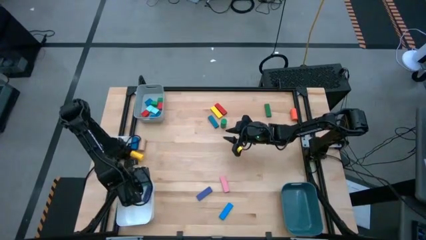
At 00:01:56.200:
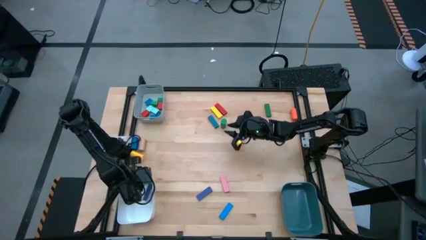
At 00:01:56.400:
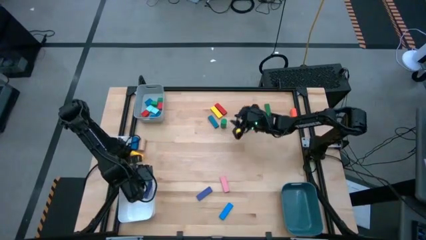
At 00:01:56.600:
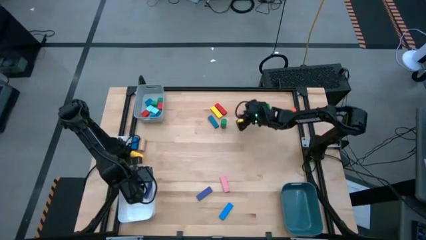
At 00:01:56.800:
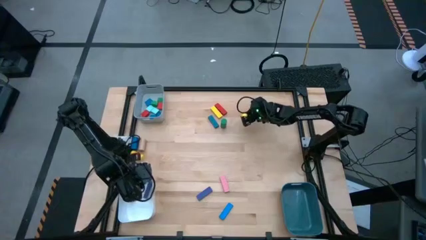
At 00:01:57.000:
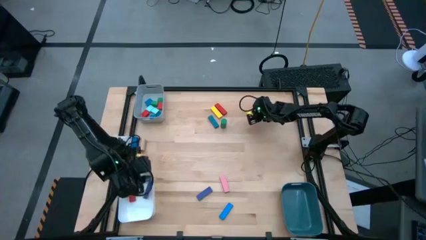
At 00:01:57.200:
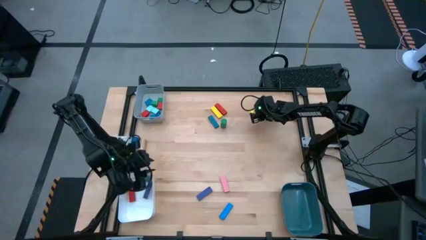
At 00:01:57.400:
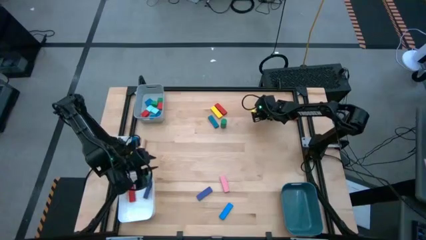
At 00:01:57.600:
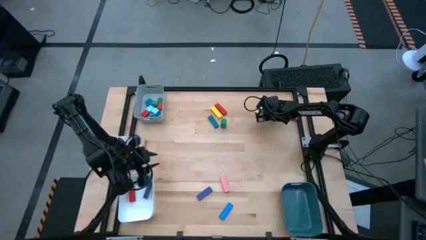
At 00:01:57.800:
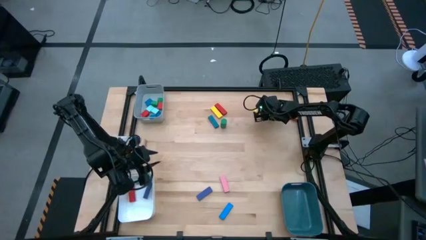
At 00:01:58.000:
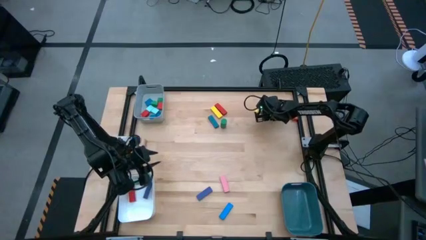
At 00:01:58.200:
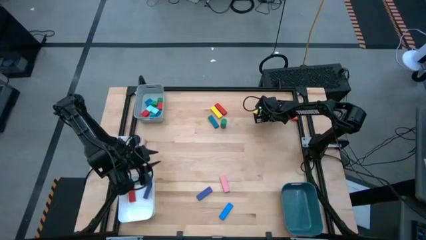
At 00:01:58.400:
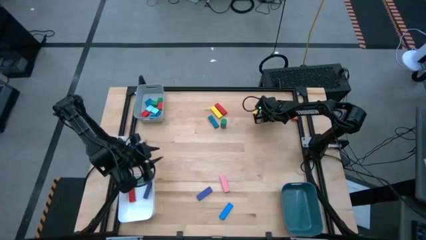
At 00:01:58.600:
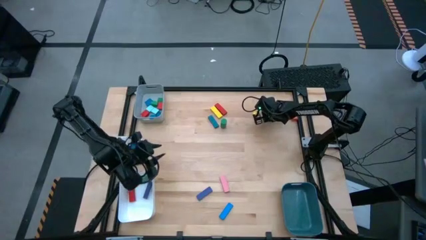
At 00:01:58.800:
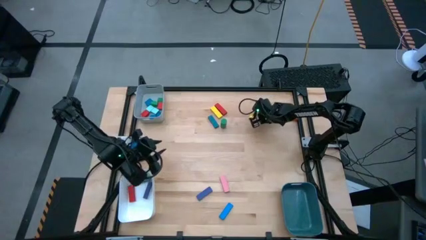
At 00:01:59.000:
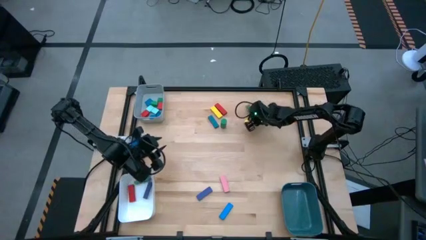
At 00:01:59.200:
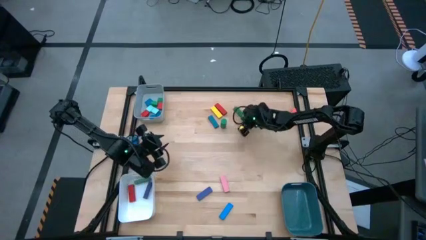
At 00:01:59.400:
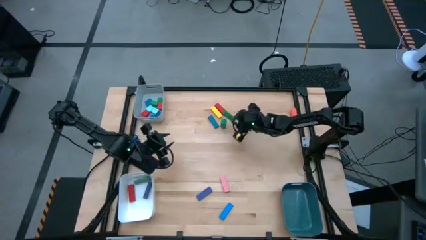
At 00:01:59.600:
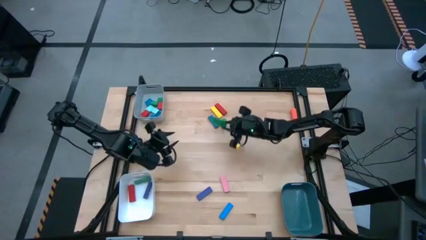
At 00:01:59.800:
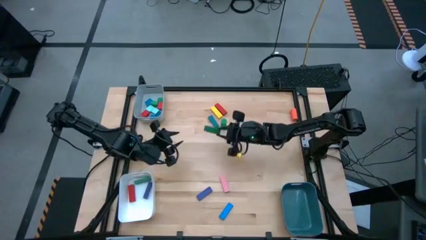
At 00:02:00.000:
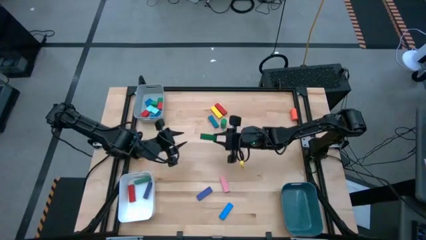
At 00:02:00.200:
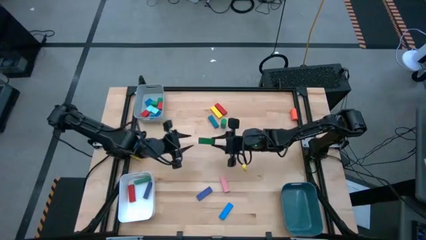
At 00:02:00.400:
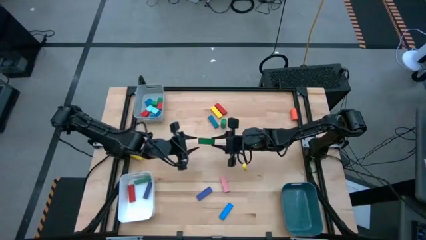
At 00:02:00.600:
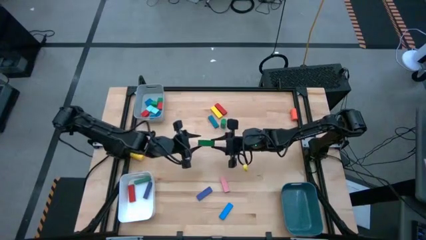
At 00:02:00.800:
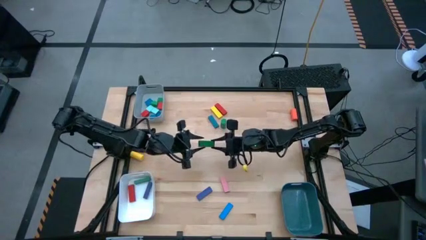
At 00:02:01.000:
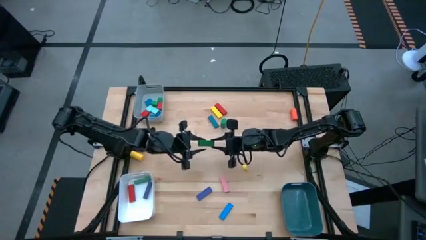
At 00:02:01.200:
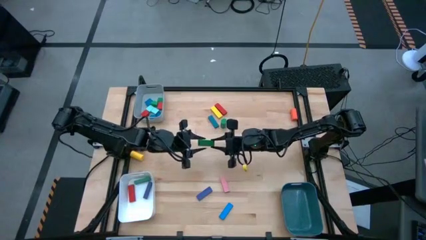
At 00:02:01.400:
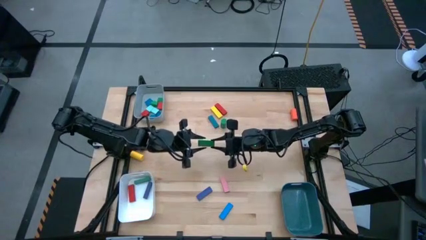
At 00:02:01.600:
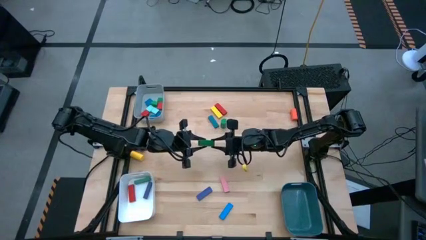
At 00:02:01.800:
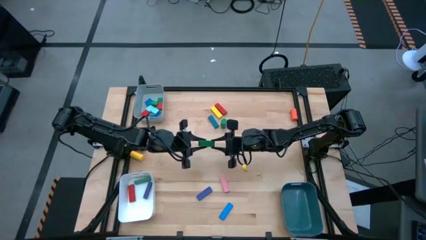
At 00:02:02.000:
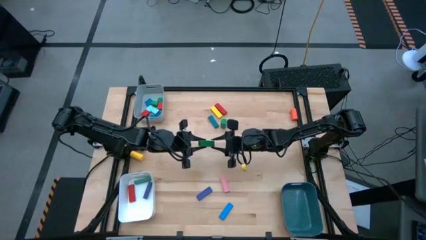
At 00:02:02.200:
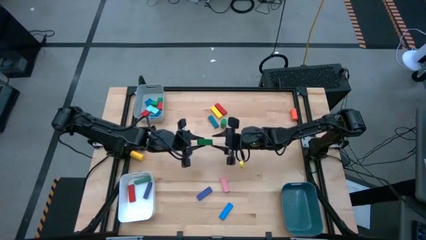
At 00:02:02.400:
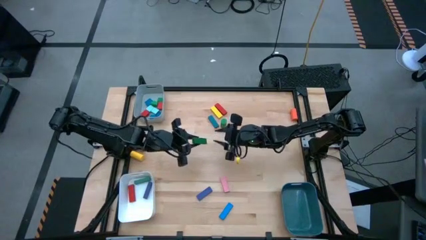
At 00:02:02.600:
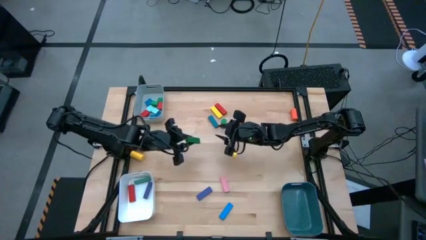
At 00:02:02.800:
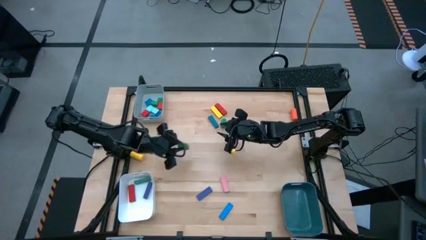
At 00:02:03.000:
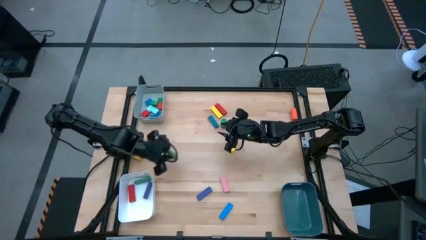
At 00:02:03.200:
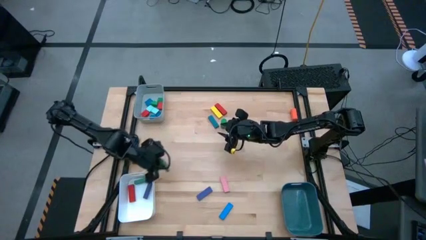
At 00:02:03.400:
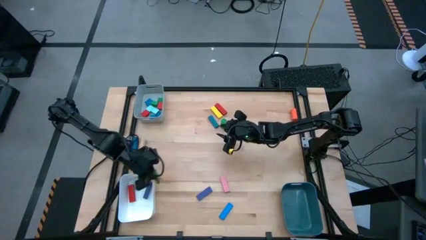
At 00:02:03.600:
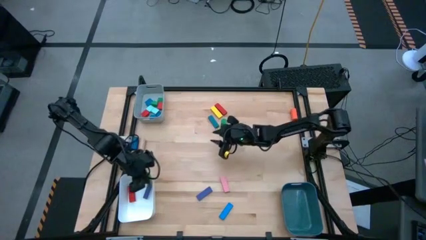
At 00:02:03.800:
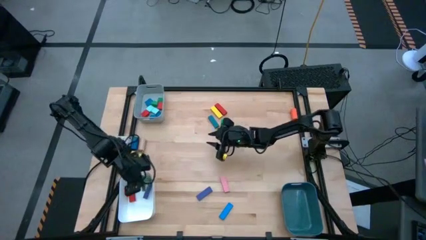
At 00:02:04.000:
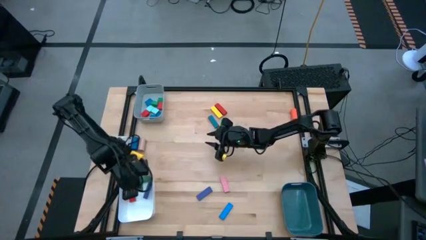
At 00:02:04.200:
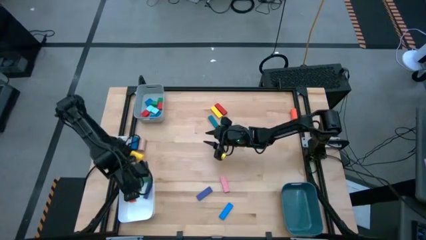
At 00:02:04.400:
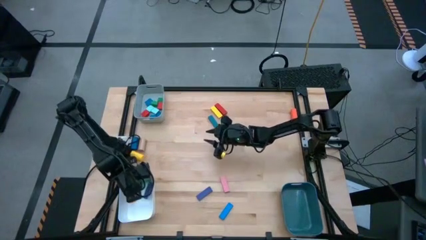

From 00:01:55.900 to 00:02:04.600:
Task: Sort blocks by size
Put the green rectangular block into the white bin

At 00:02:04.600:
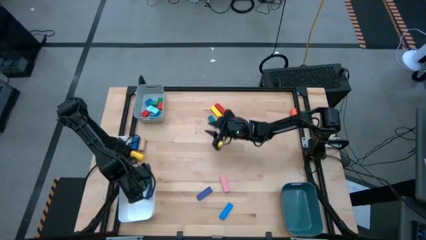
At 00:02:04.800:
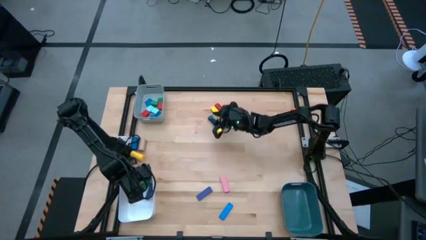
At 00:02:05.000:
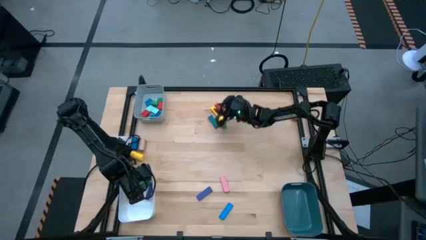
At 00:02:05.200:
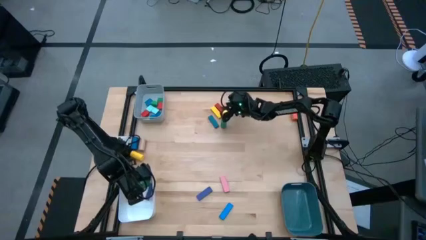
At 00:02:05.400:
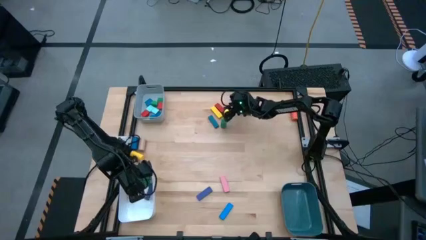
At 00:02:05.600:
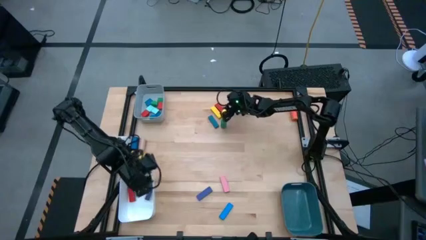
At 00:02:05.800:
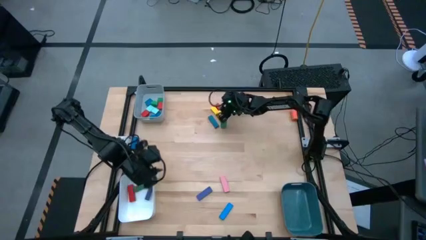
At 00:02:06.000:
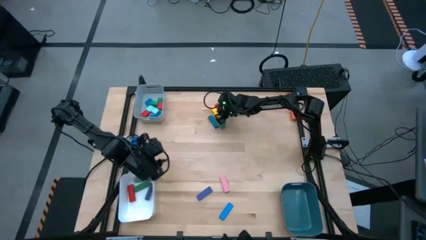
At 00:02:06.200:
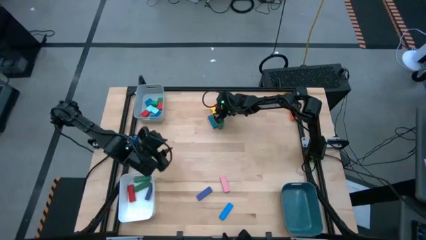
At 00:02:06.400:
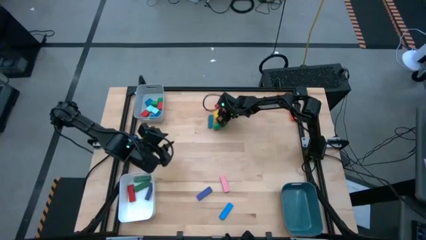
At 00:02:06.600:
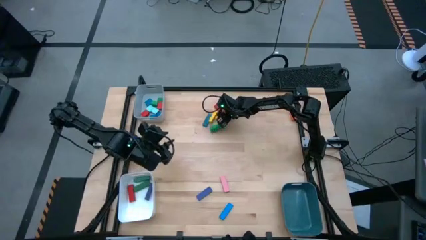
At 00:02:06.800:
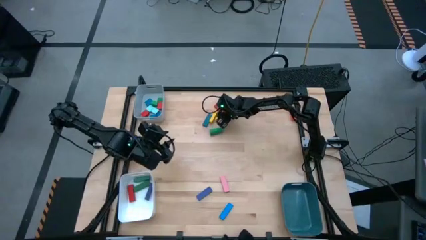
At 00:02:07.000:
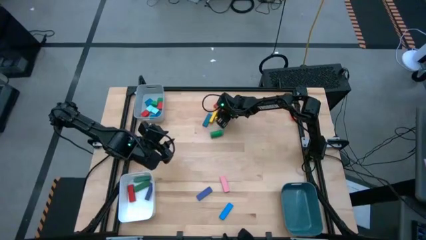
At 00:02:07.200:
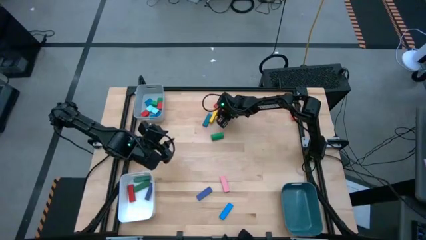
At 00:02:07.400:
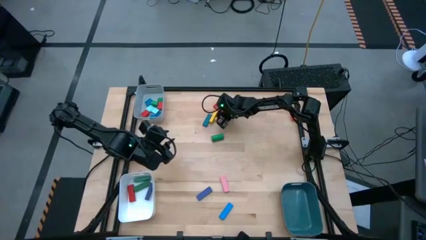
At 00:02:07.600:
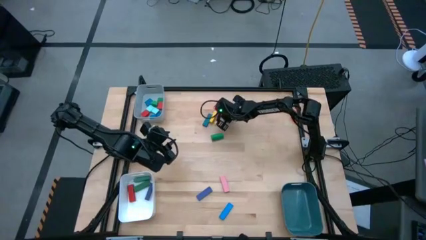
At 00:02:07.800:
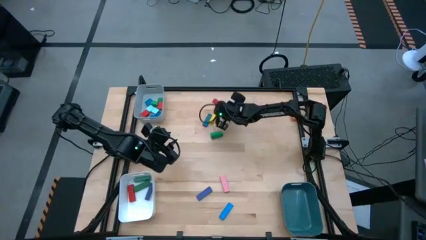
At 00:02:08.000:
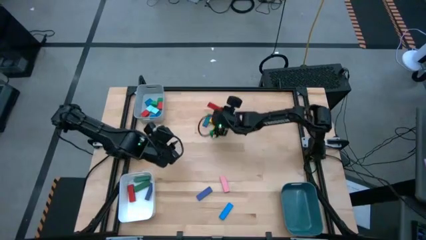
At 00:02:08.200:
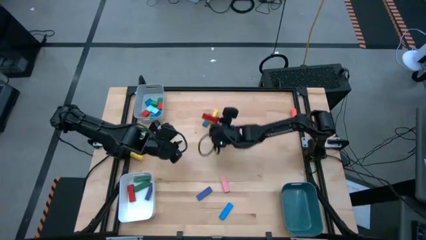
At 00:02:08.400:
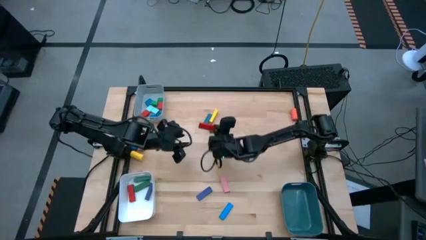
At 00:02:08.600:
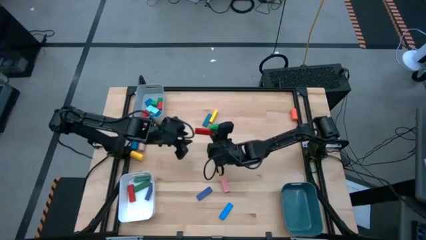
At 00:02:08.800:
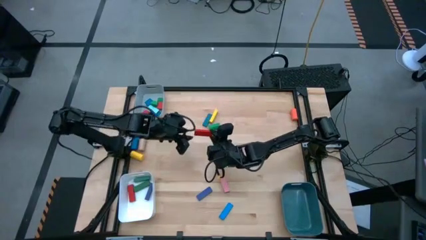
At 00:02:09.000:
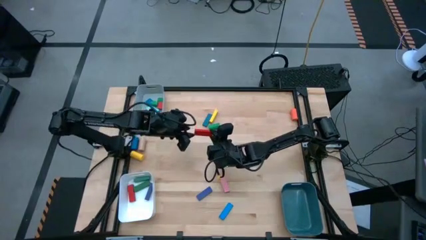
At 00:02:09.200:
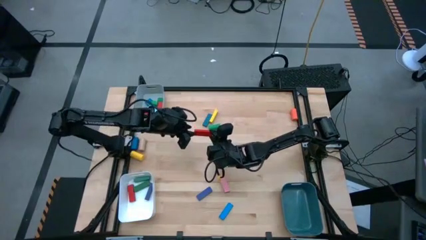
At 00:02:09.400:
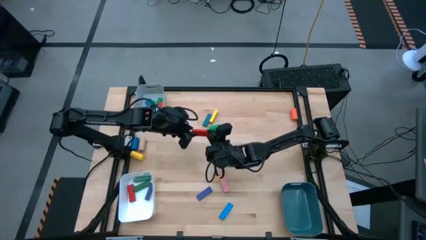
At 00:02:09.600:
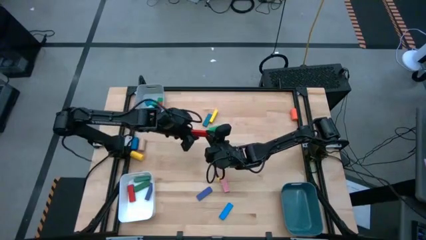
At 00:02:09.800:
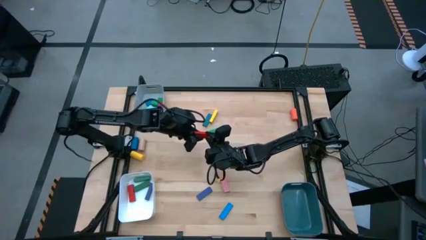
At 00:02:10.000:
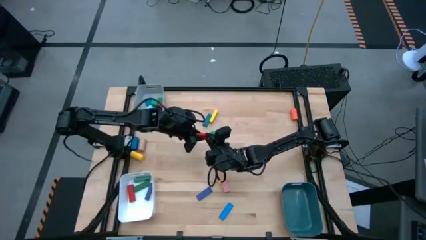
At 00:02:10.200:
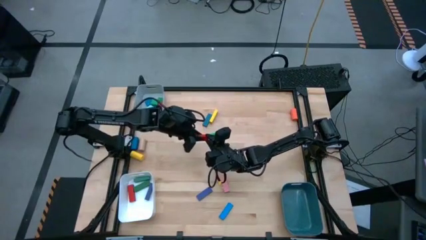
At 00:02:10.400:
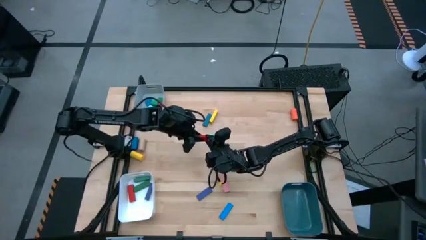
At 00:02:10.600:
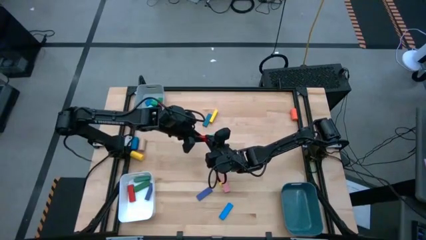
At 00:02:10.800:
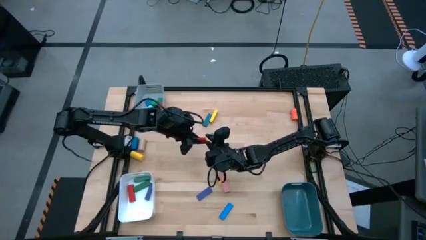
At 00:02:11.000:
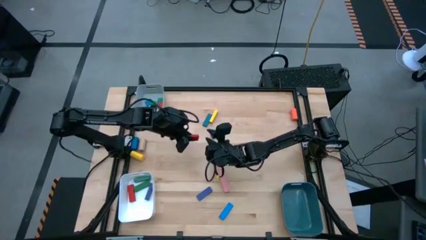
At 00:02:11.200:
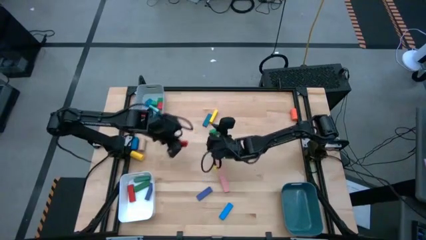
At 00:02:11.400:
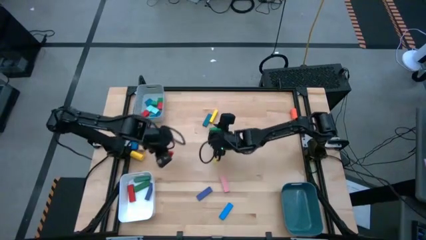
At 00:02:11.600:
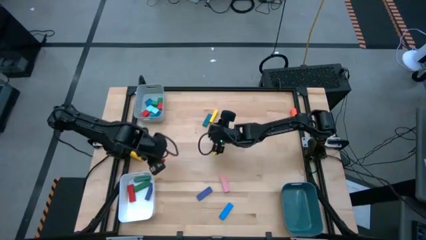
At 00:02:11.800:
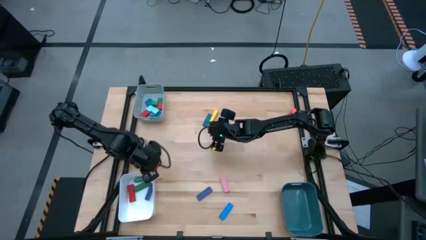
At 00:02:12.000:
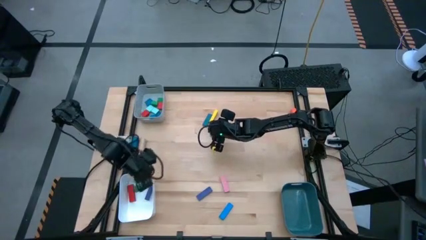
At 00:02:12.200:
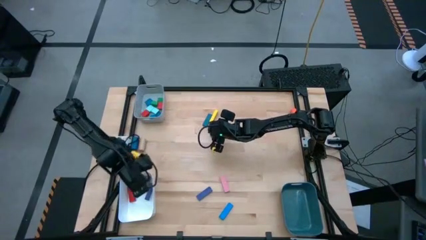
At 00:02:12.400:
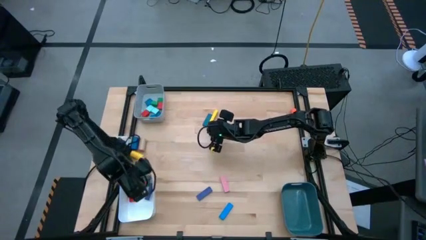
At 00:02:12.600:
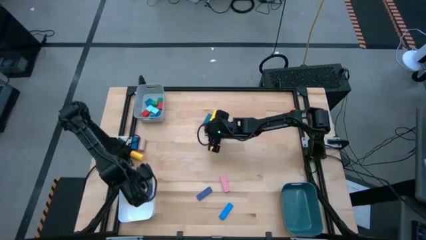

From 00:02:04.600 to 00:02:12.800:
Put the red rectangular block into the white bin
